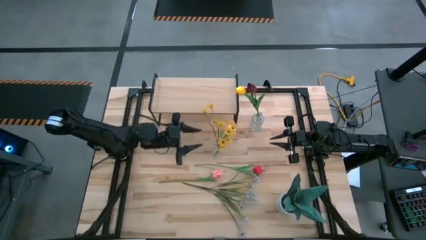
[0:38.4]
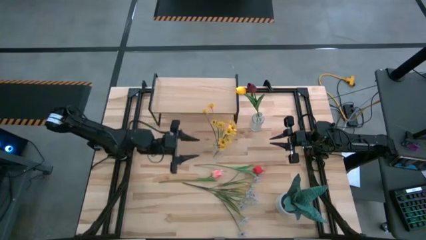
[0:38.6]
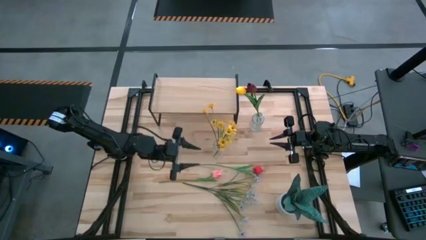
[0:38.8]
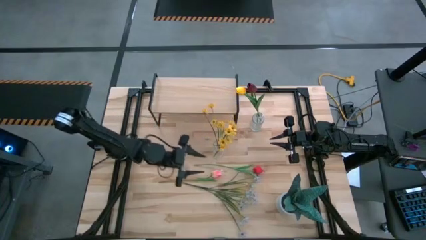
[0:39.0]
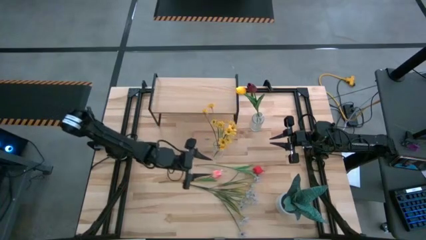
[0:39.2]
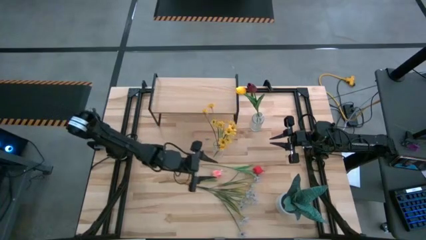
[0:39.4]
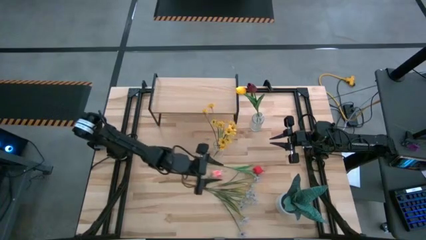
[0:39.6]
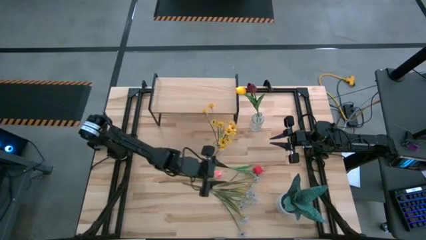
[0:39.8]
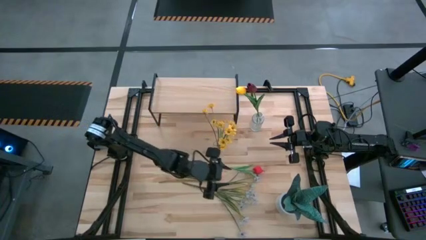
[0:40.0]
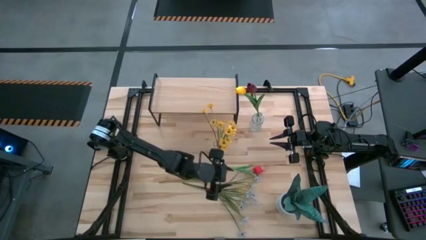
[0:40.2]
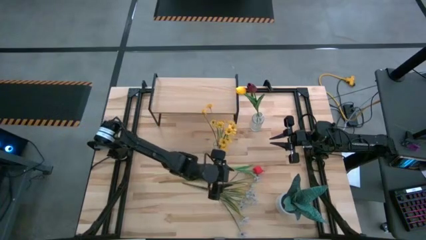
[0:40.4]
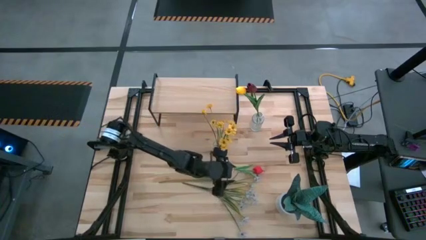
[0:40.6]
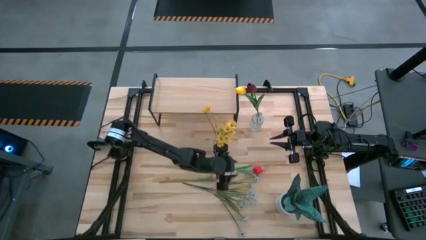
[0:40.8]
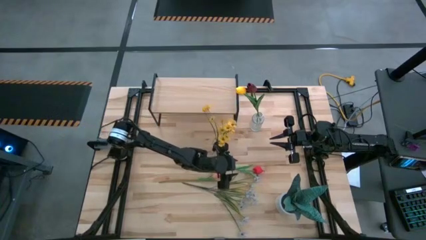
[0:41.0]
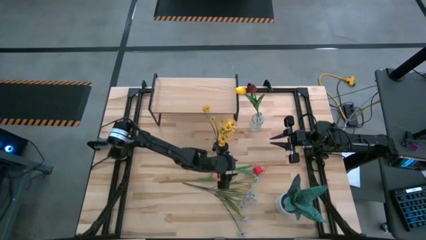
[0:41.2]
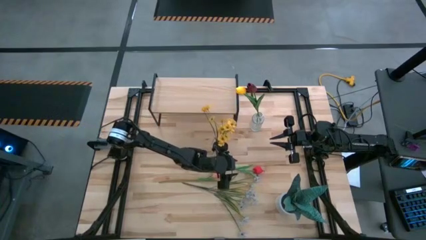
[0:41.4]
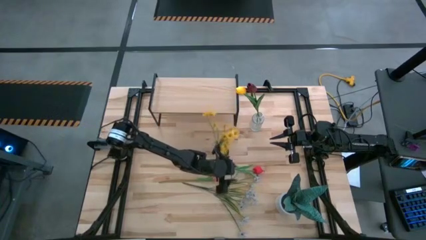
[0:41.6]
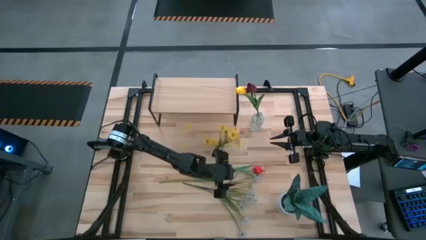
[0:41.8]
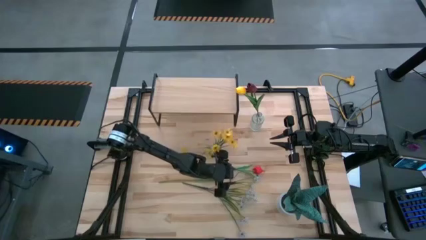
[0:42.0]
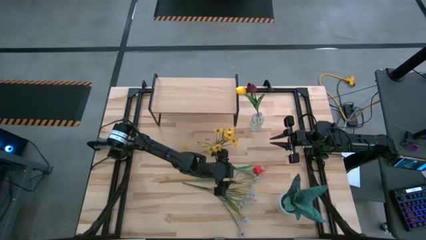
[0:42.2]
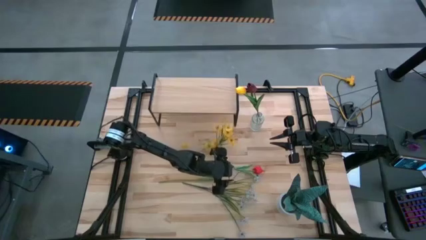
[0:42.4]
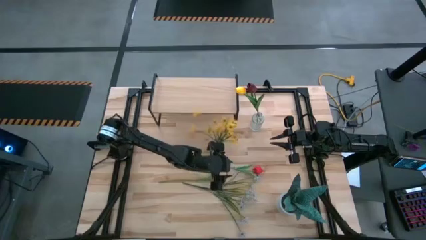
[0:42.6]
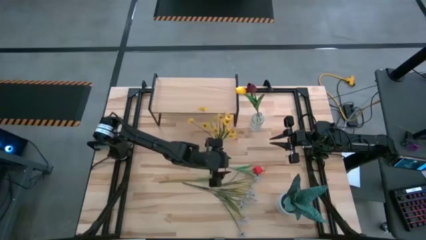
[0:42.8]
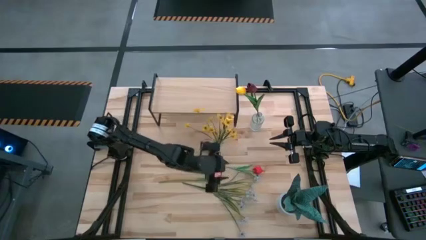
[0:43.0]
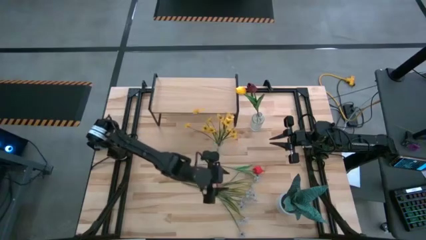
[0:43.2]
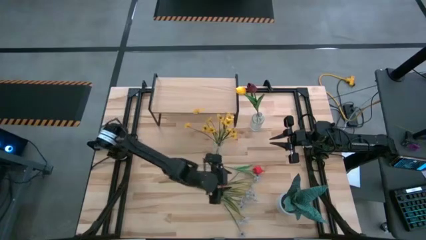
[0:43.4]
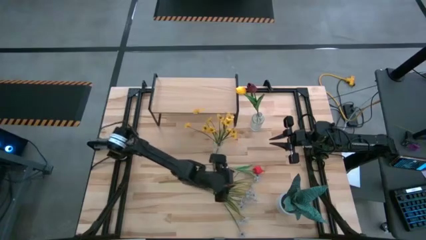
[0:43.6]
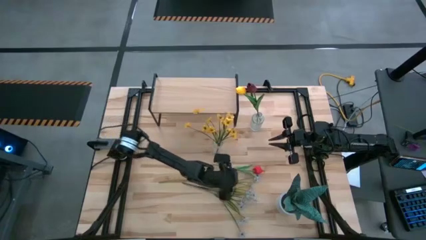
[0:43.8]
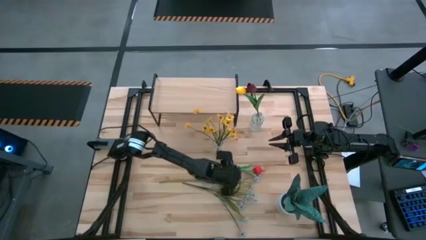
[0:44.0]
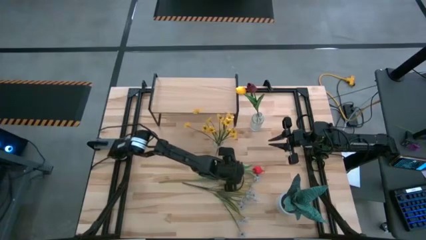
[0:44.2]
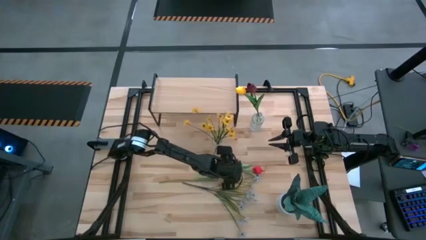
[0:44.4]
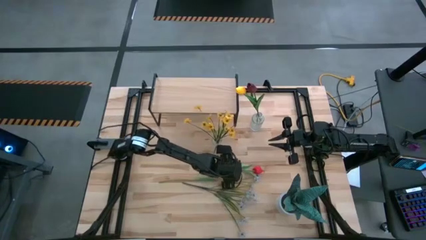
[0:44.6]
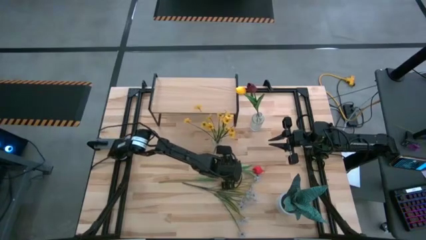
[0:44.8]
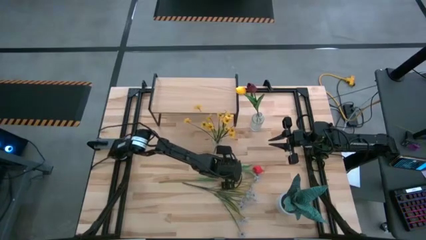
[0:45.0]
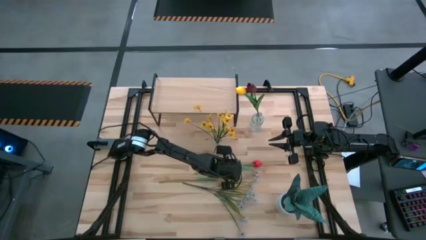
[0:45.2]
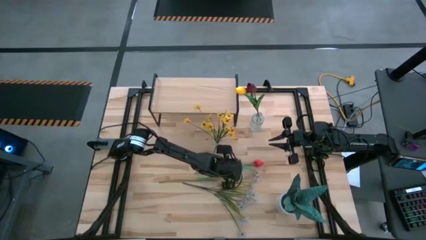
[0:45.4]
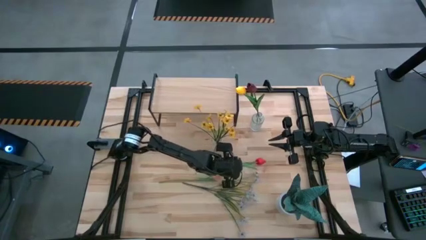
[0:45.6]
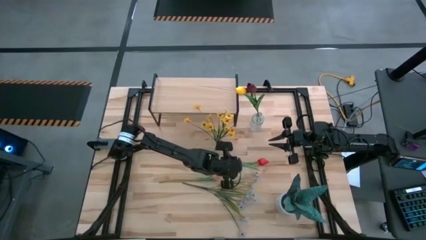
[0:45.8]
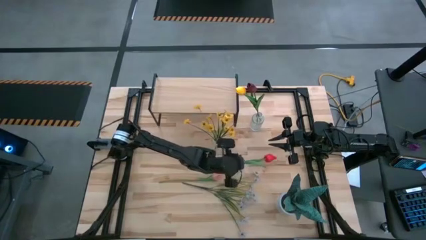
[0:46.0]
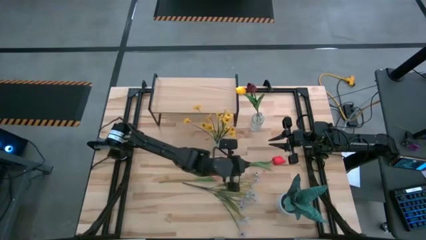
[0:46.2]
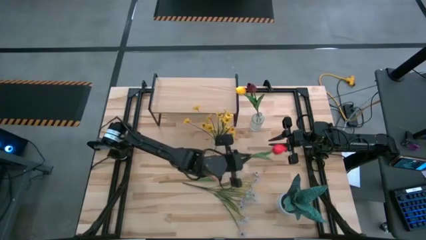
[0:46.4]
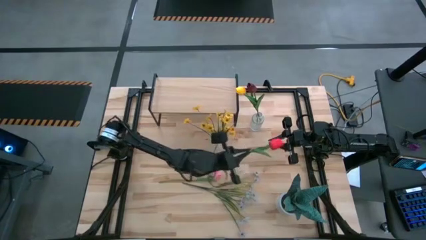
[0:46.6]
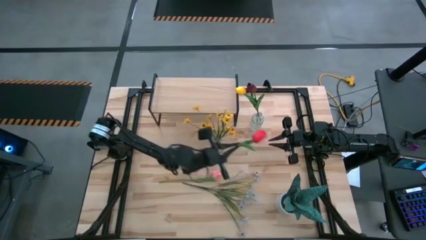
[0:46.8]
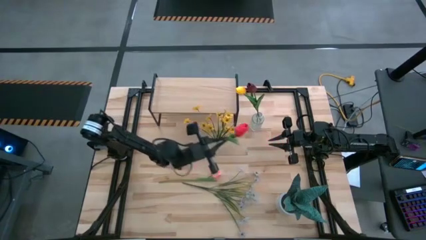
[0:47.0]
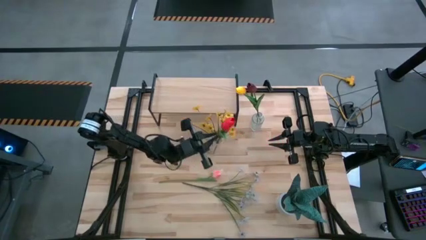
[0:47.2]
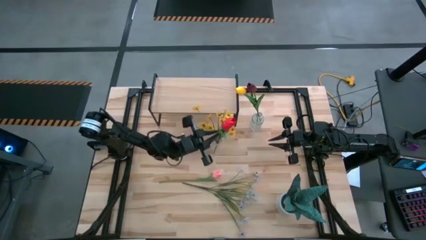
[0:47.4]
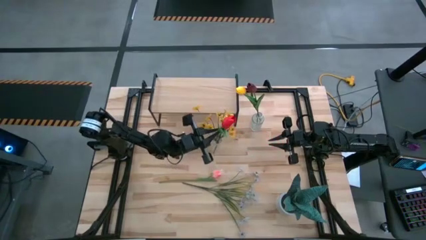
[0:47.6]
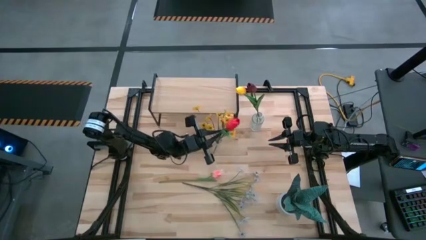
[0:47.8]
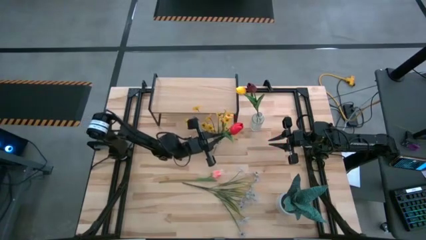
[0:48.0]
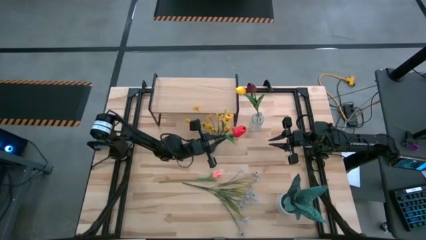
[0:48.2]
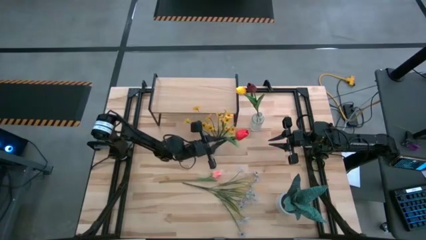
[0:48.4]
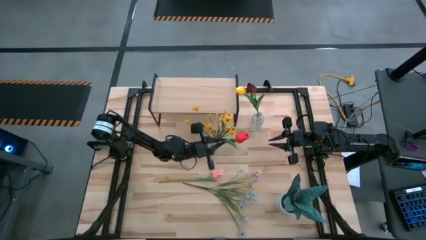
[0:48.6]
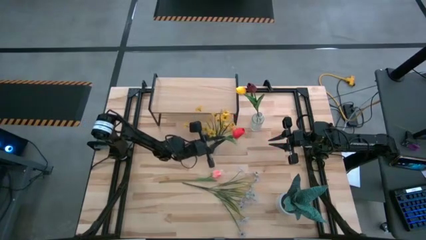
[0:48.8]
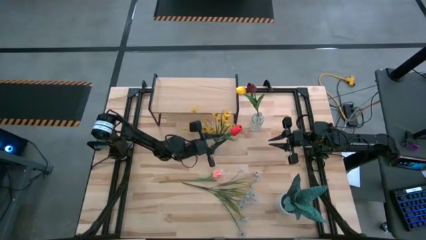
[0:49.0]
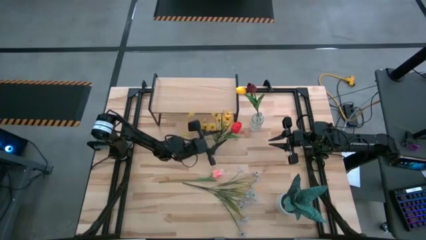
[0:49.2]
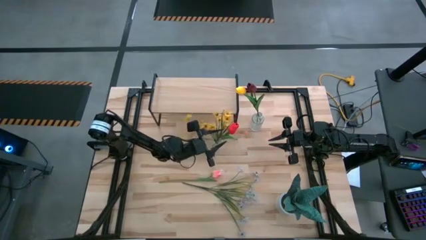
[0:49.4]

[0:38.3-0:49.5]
Task: Pick and place flowers into a vace then onto a shelf
Put the red tulip into the bottom transparent vase

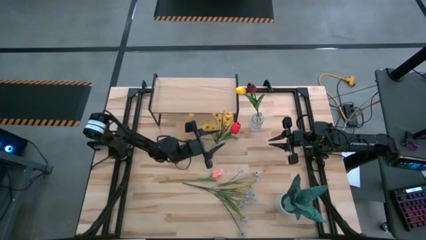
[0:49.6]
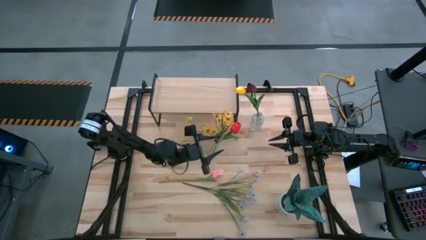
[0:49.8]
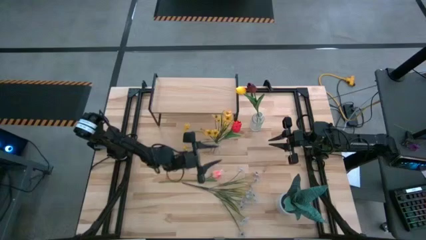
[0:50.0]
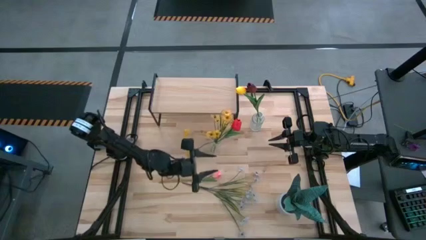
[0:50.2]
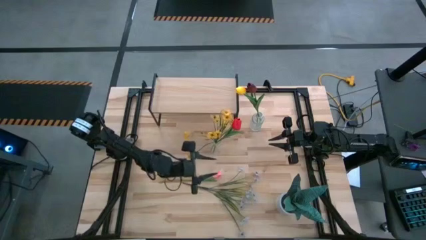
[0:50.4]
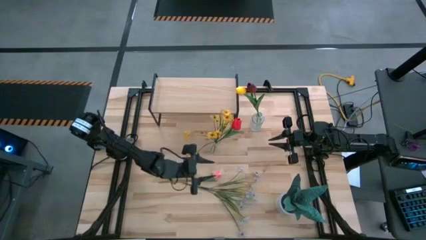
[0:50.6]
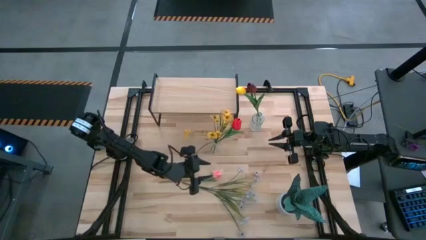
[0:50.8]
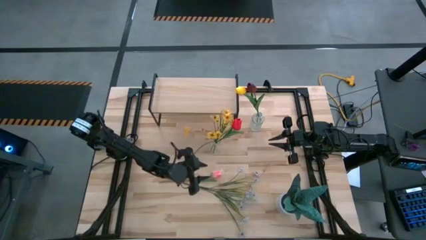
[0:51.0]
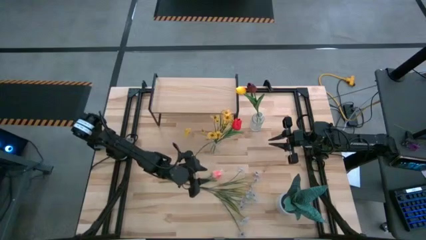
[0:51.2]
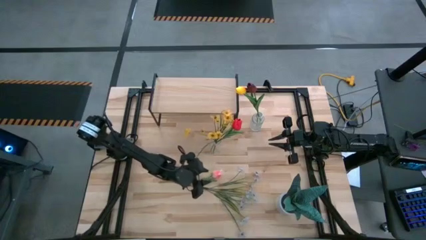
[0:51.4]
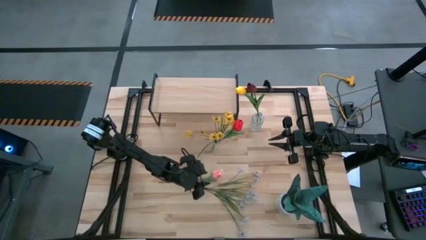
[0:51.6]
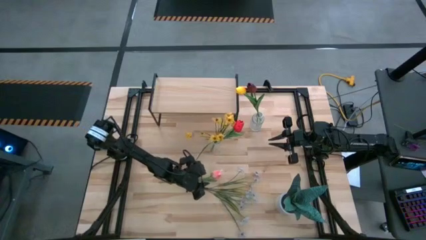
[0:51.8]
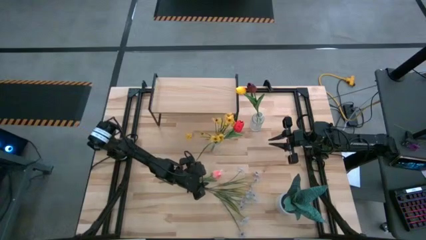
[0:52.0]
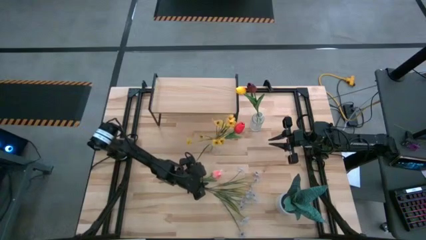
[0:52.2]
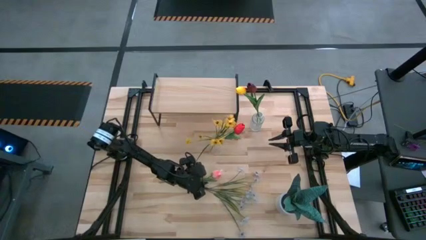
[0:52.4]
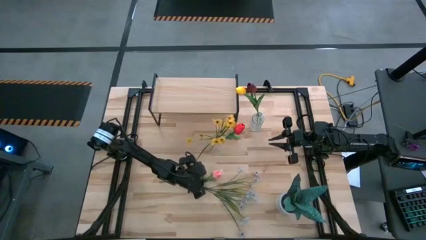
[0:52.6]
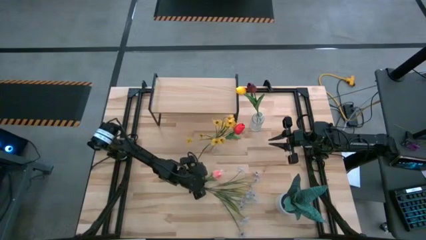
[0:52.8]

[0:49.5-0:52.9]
Put the pink tulip into the top transparent vase
